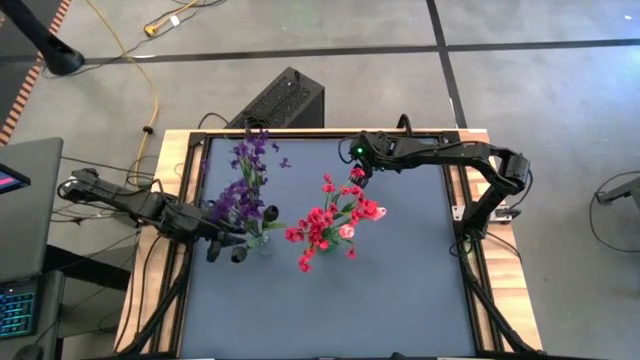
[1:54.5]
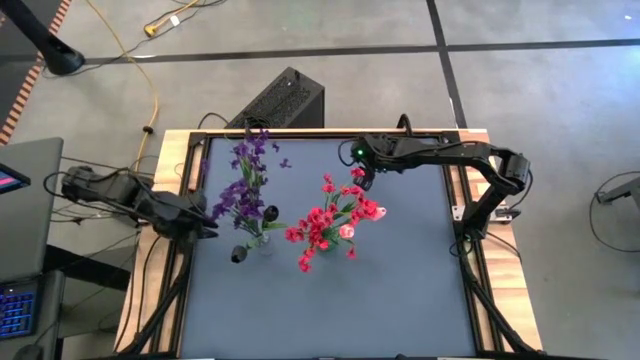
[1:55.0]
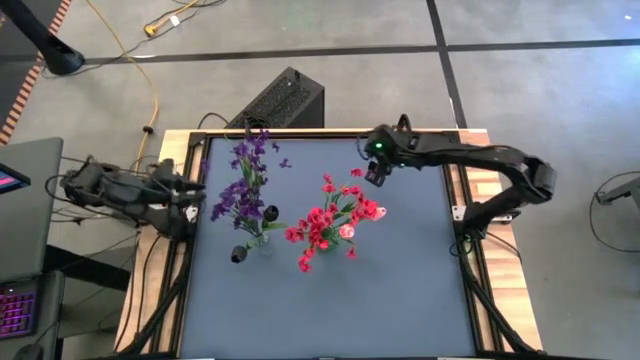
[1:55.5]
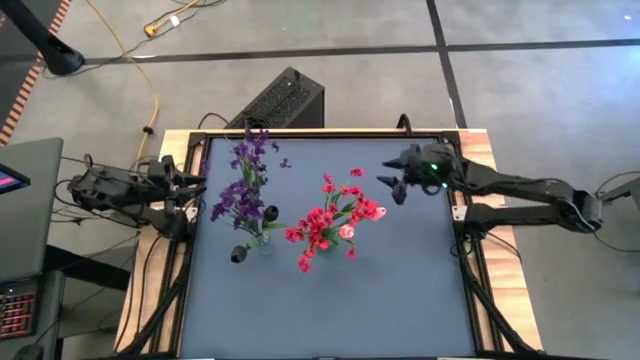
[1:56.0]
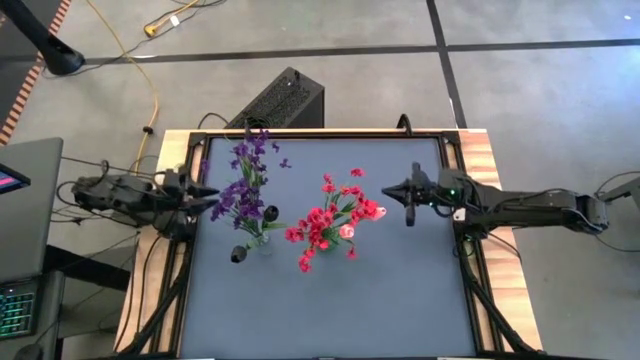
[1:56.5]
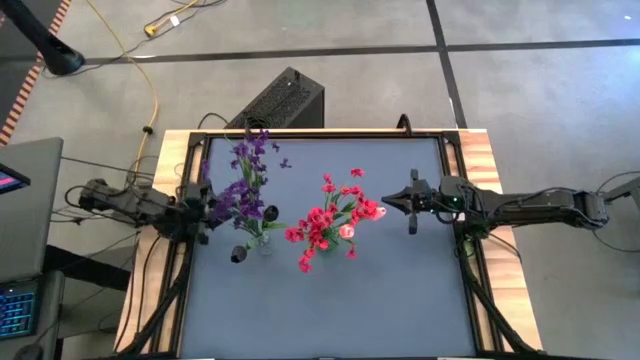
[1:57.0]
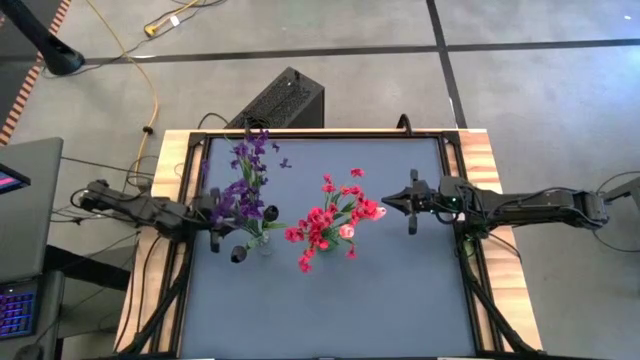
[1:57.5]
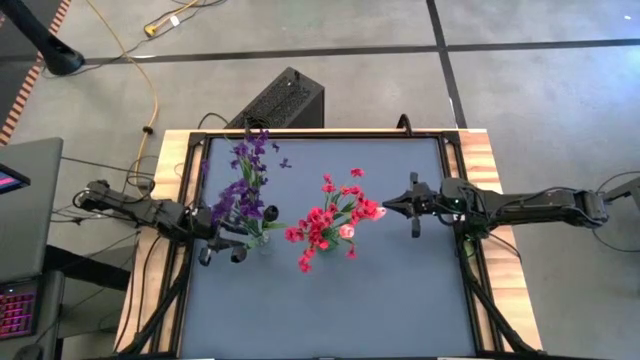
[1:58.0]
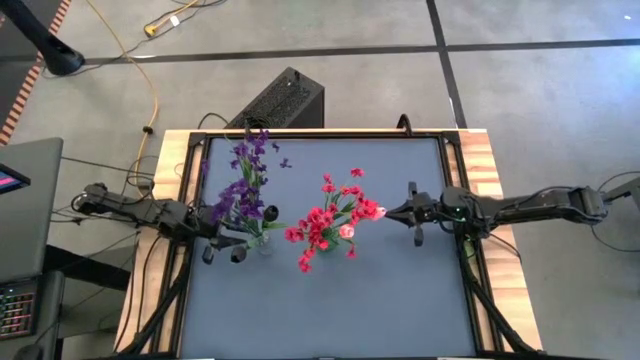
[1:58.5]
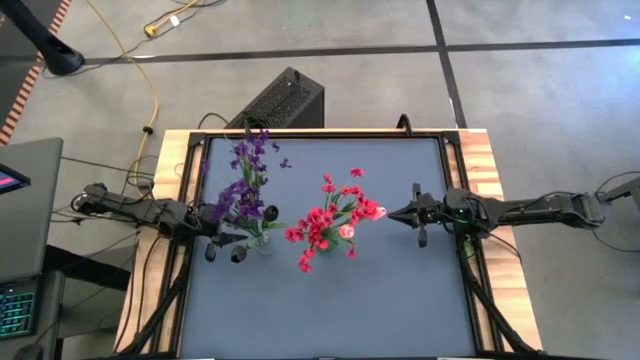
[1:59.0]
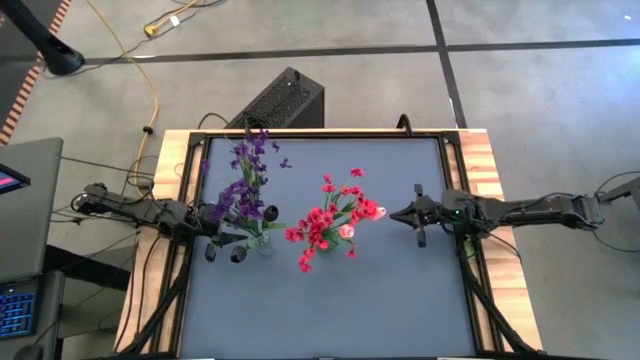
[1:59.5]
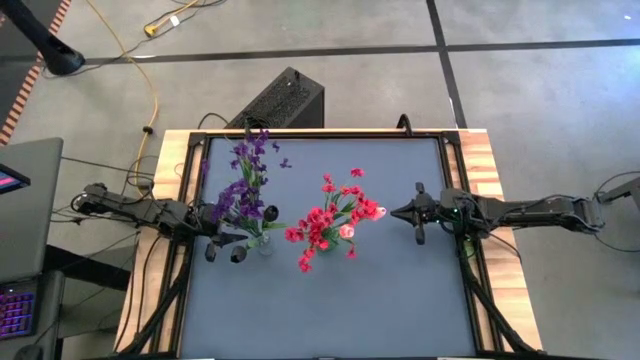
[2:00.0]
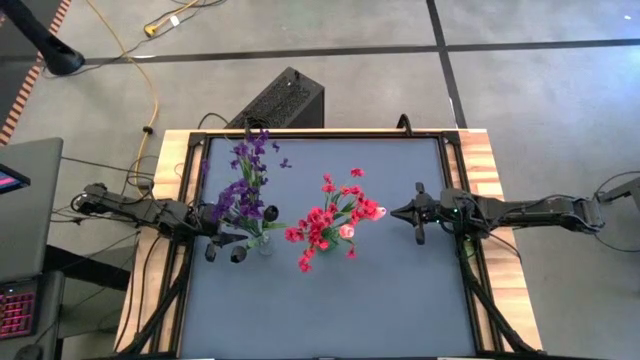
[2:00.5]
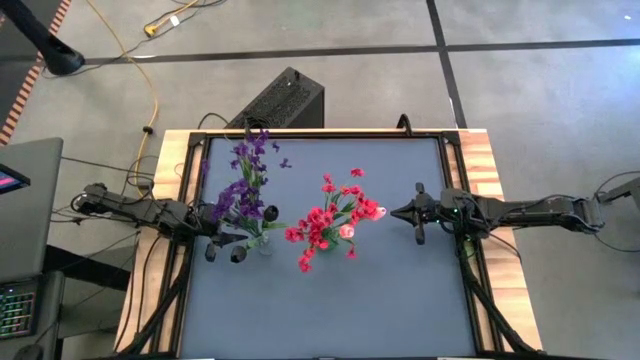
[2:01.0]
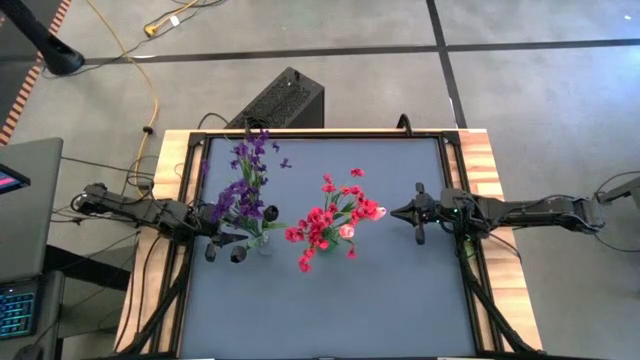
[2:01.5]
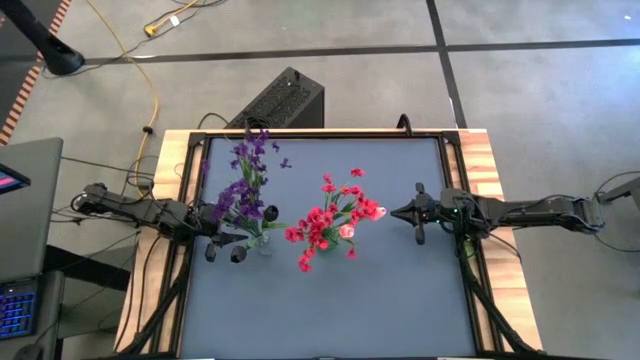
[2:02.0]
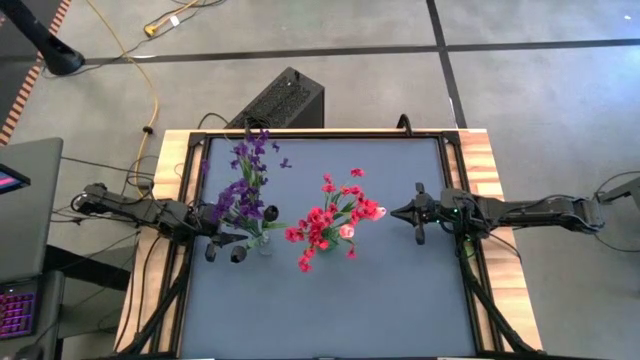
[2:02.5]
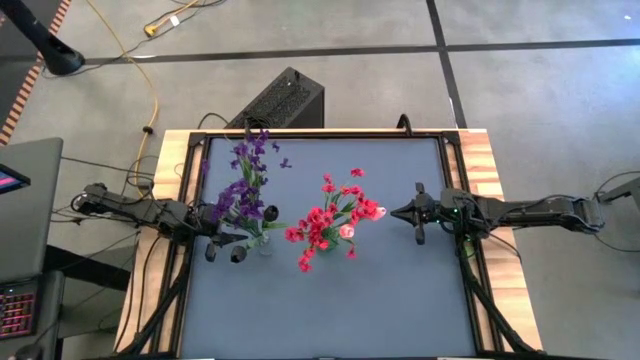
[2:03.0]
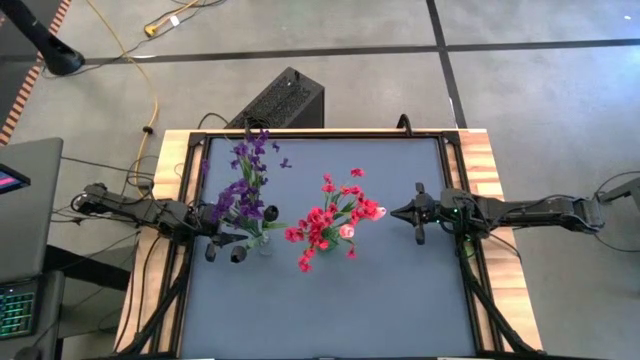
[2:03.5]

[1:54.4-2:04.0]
Task: Sort flowers into vase by color
Return to home position

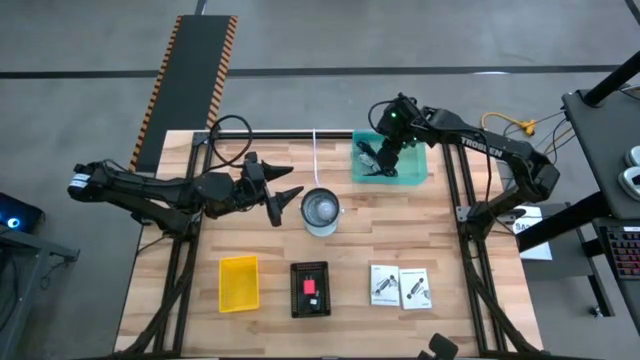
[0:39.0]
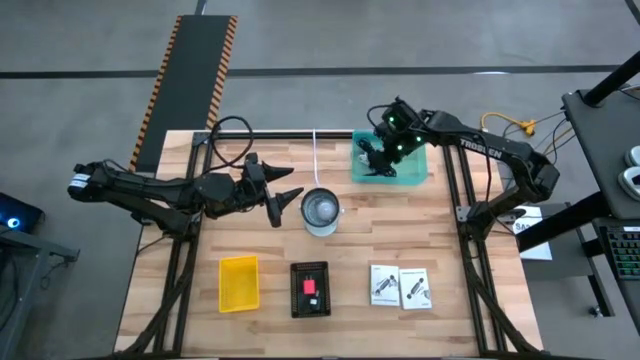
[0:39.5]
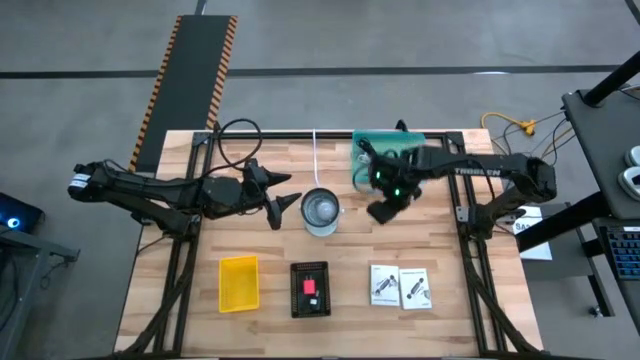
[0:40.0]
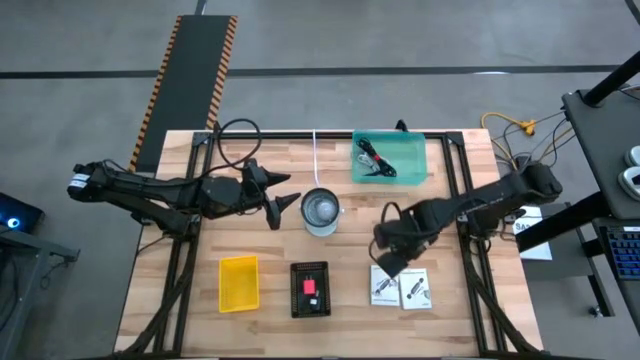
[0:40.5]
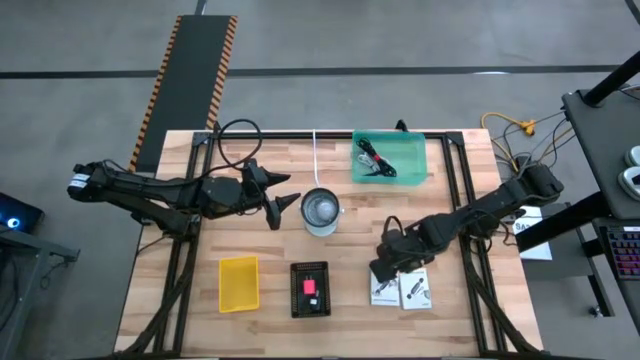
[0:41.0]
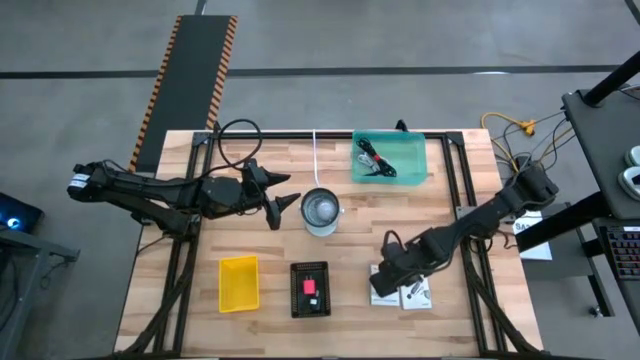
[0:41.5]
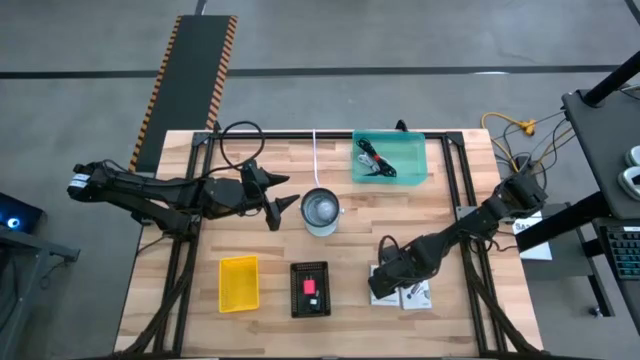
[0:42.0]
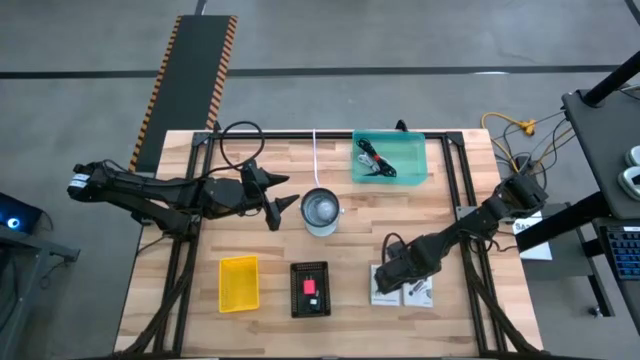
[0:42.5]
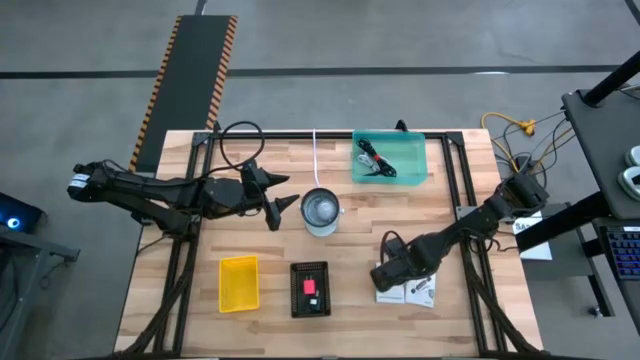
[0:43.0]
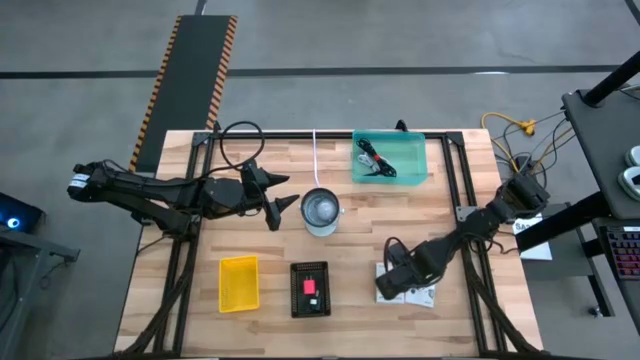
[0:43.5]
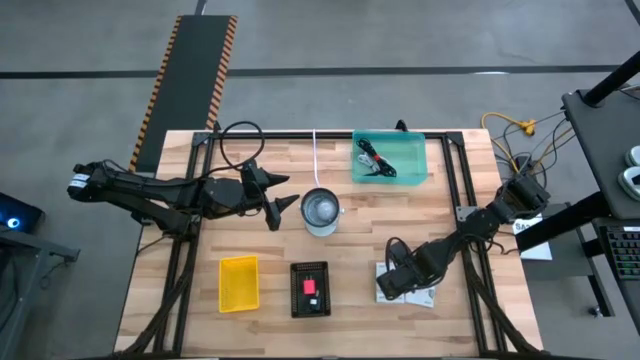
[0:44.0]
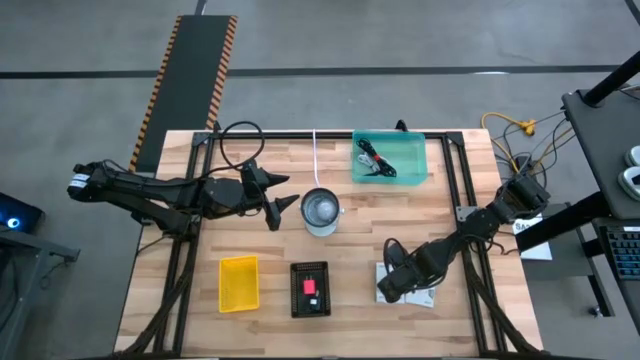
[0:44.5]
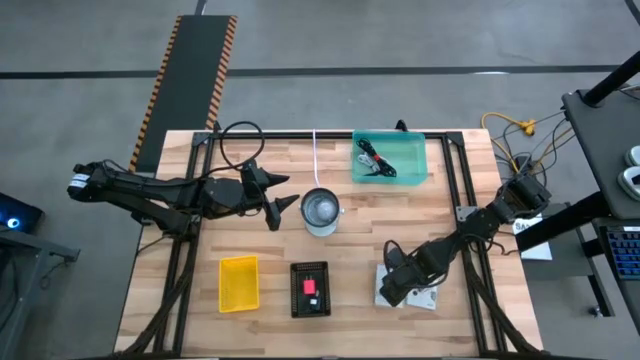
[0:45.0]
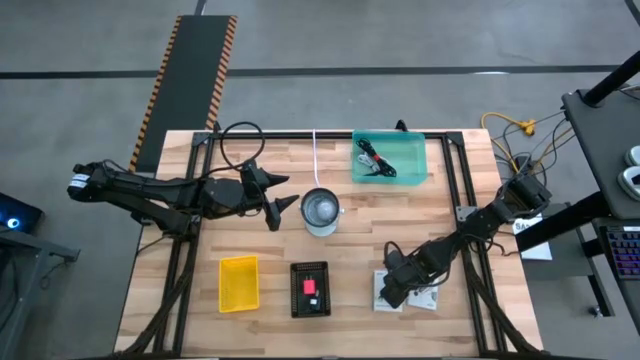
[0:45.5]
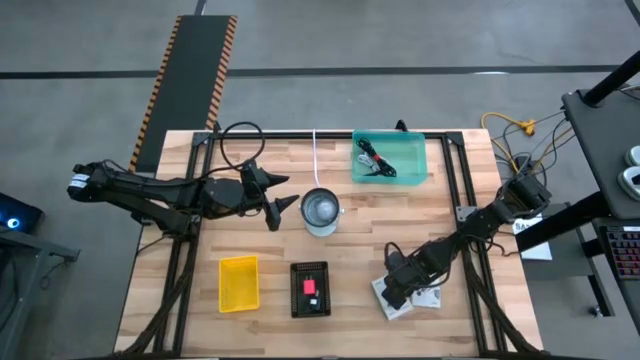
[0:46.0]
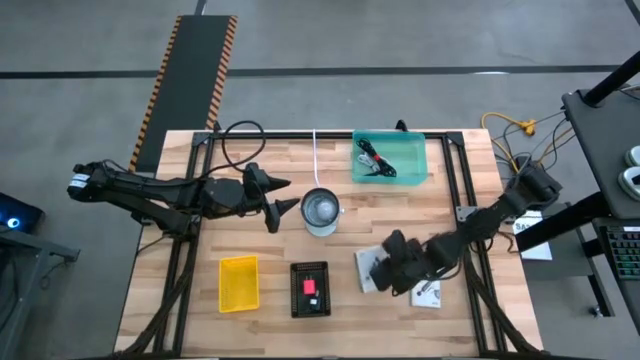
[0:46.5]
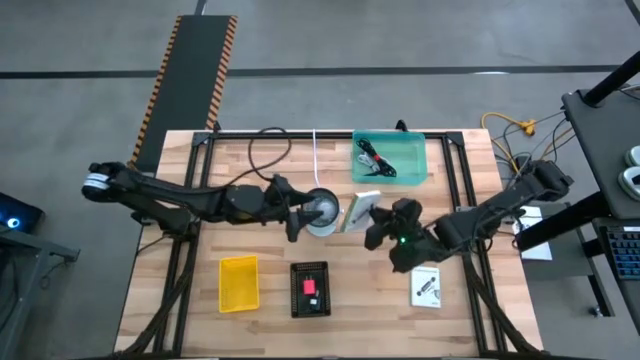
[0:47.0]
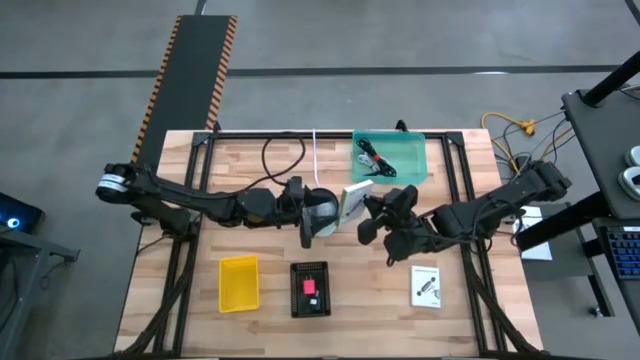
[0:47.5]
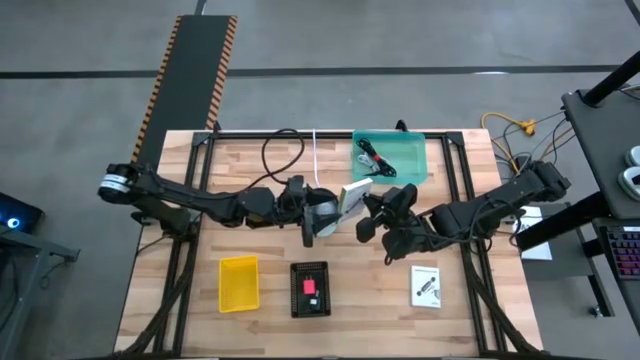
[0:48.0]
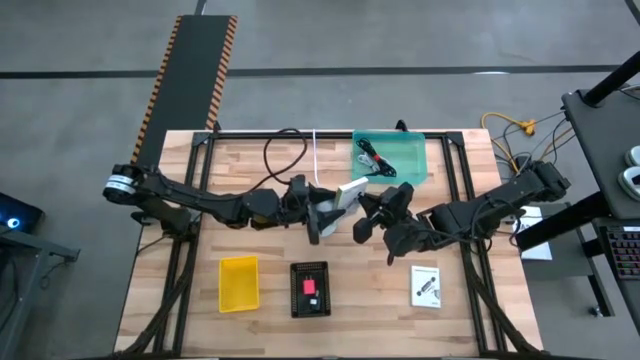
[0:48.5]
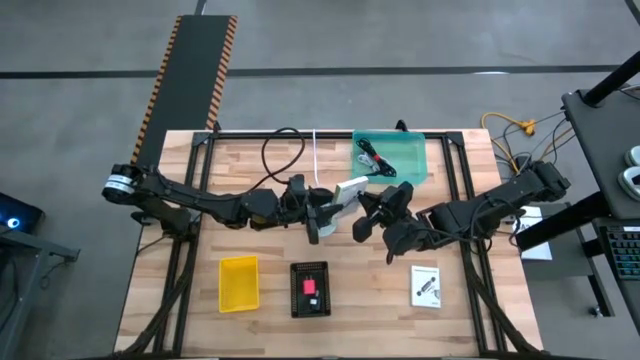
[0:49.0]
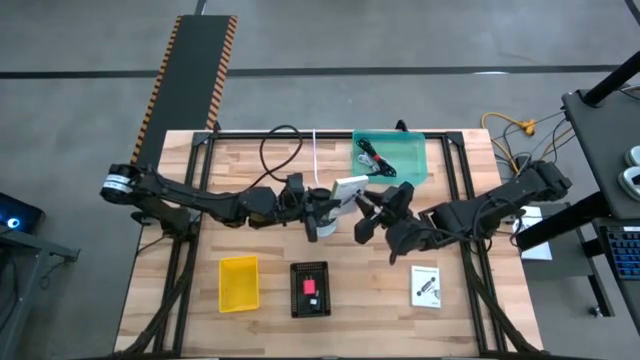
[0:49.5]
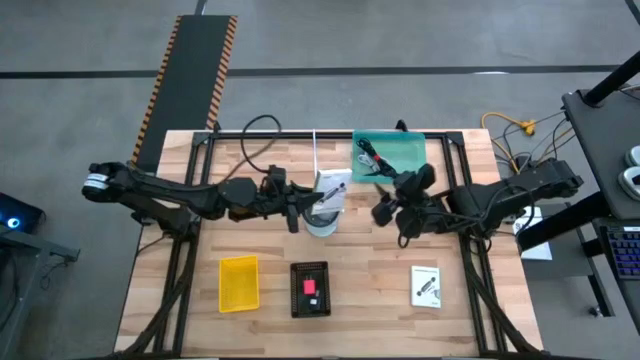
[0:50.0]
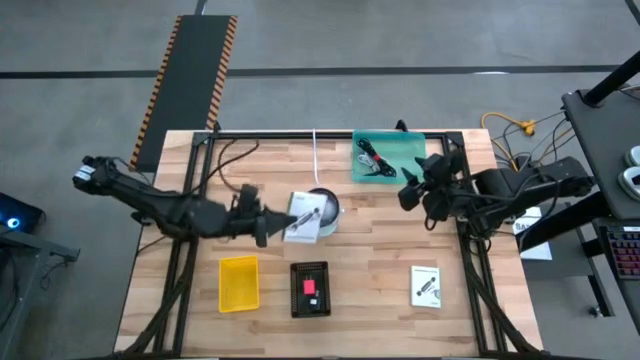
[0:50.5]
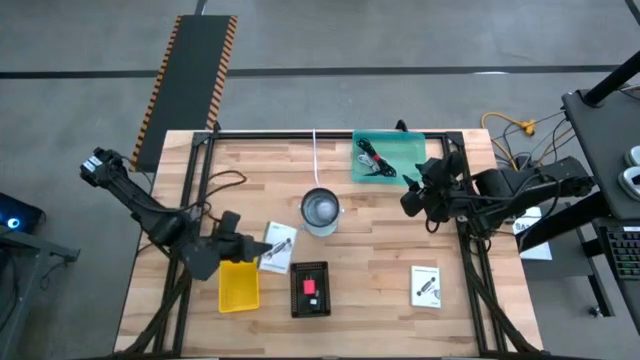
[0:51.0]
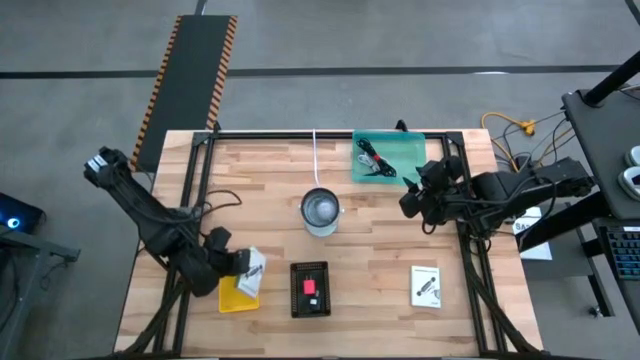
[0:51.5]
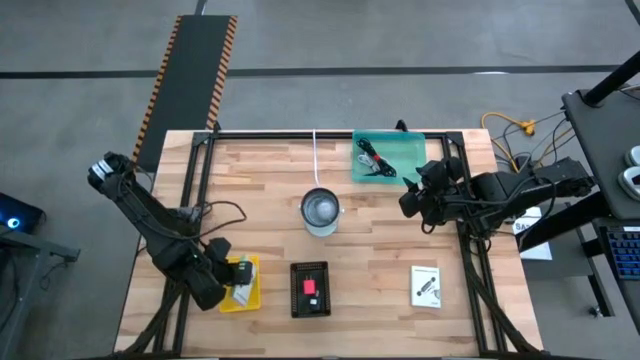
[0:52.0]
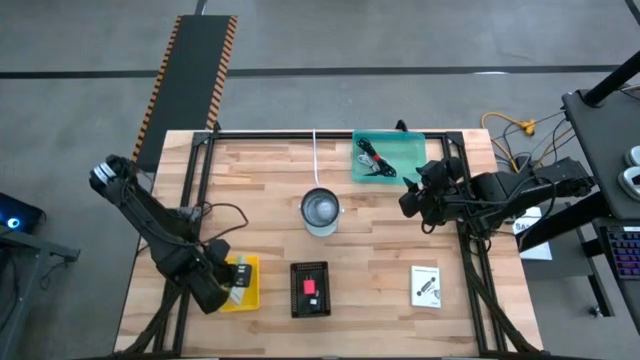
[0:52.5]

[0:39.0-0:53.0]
Task: Pick and place items into bin
Put the left card reader box into the yellow bin
